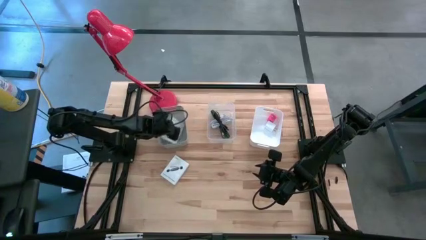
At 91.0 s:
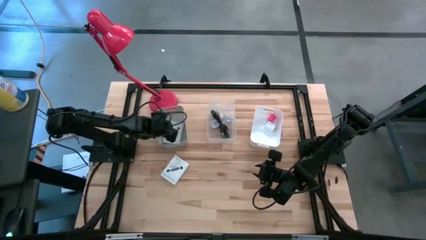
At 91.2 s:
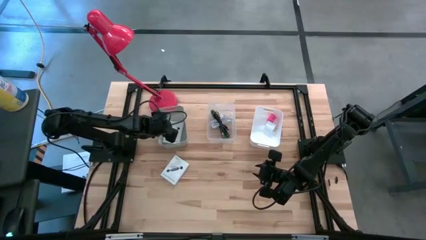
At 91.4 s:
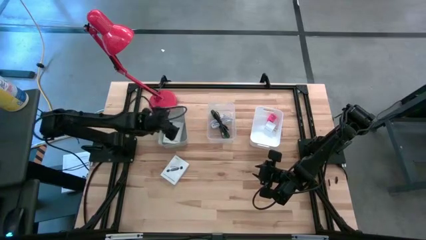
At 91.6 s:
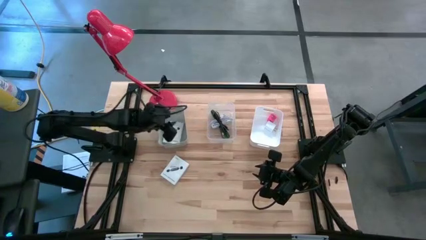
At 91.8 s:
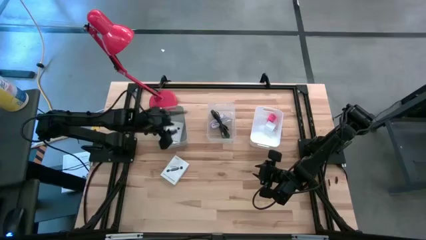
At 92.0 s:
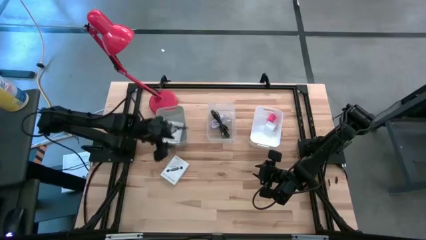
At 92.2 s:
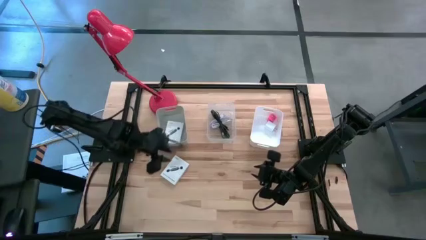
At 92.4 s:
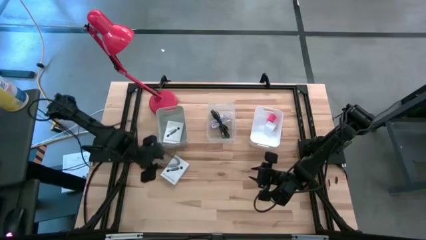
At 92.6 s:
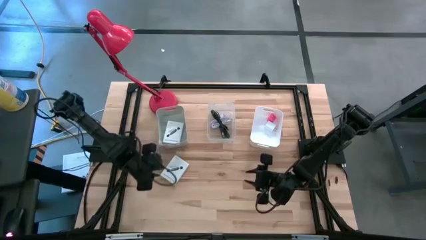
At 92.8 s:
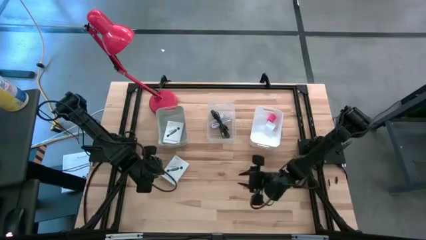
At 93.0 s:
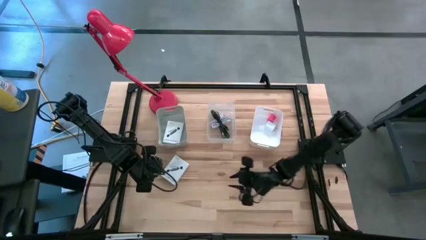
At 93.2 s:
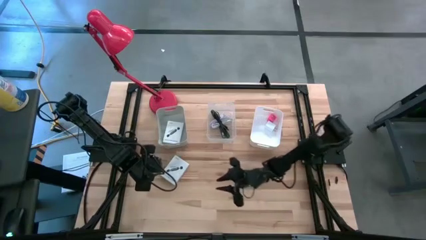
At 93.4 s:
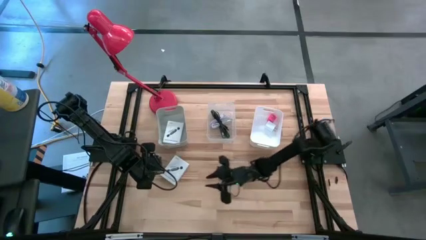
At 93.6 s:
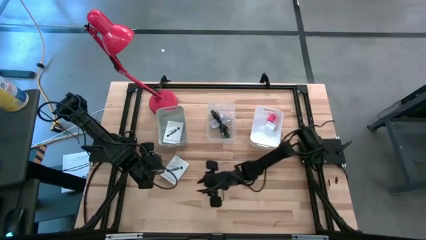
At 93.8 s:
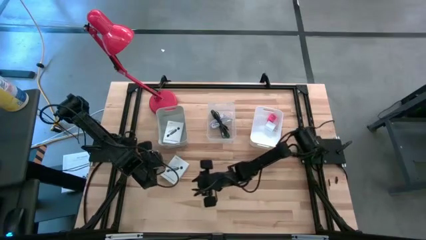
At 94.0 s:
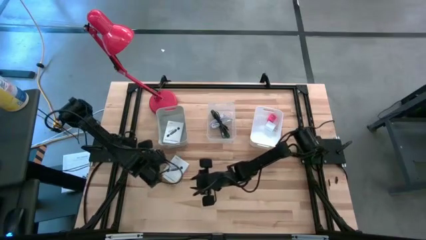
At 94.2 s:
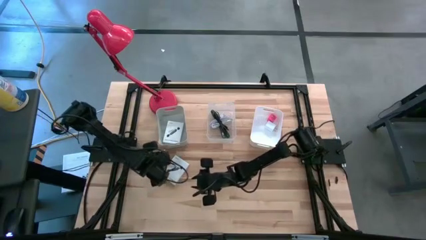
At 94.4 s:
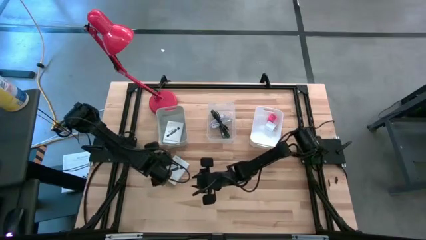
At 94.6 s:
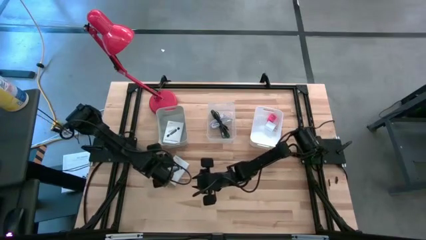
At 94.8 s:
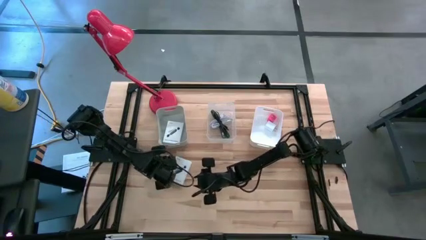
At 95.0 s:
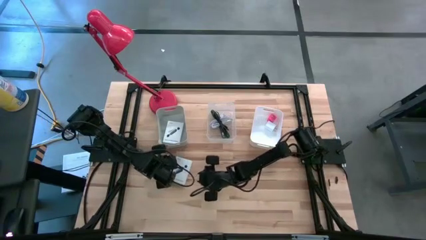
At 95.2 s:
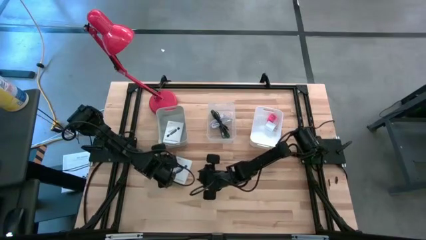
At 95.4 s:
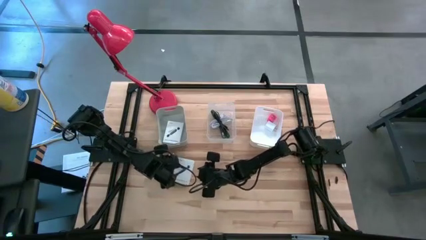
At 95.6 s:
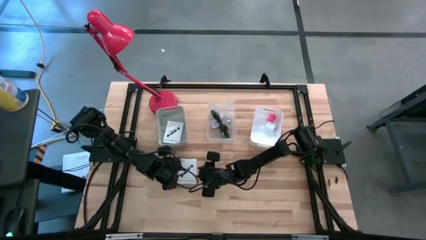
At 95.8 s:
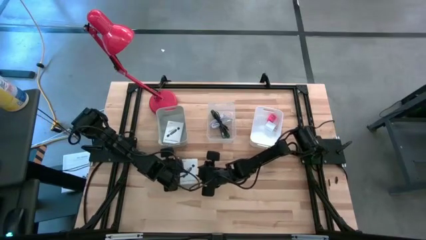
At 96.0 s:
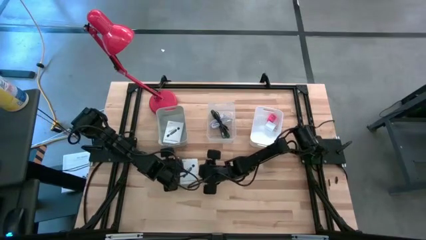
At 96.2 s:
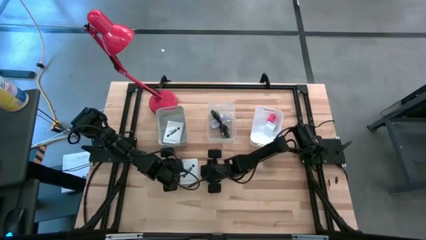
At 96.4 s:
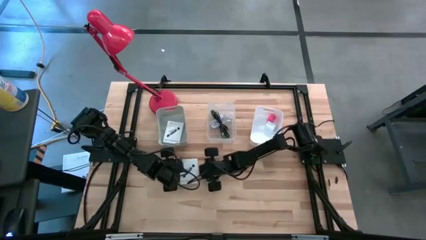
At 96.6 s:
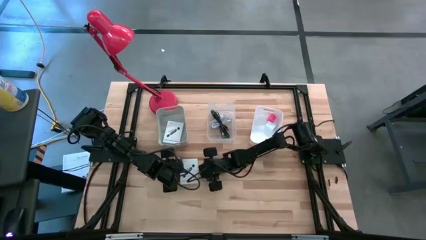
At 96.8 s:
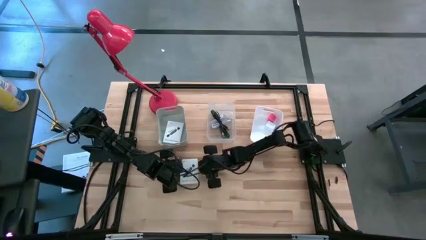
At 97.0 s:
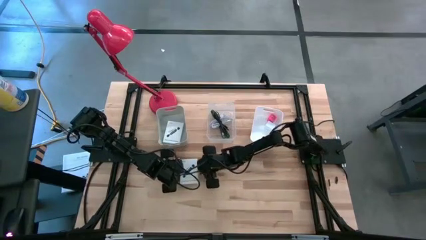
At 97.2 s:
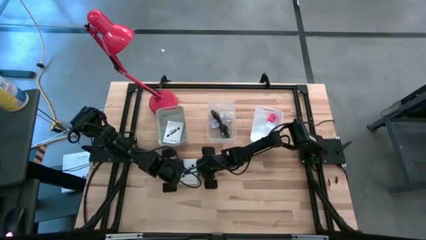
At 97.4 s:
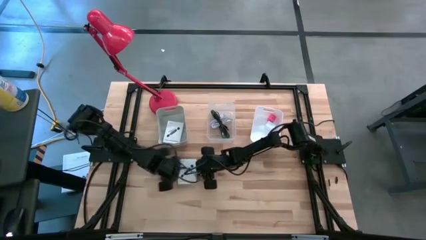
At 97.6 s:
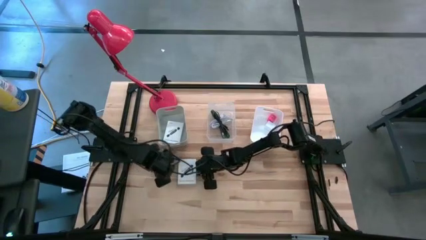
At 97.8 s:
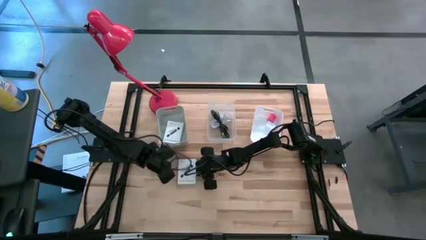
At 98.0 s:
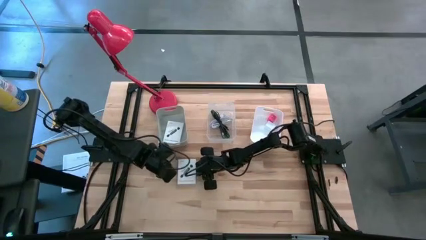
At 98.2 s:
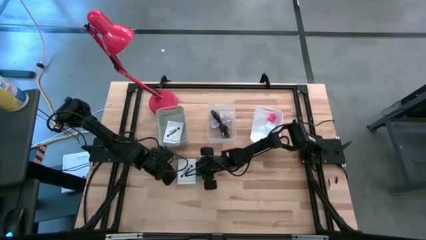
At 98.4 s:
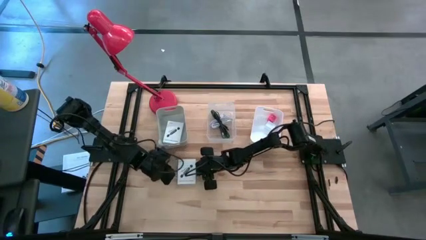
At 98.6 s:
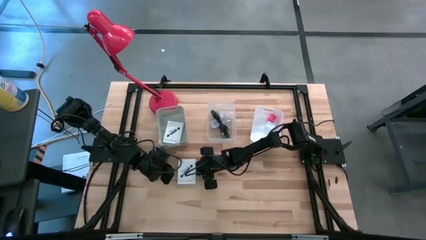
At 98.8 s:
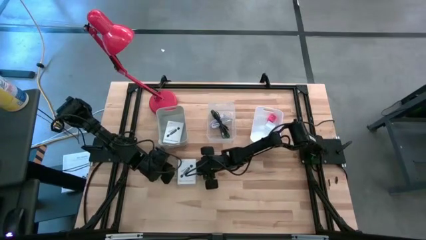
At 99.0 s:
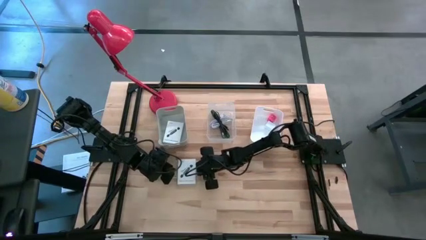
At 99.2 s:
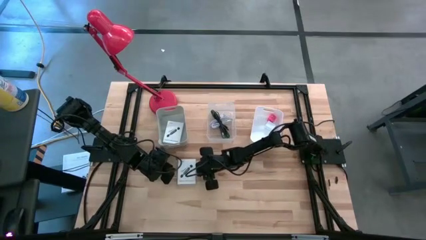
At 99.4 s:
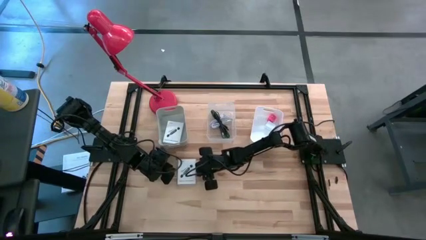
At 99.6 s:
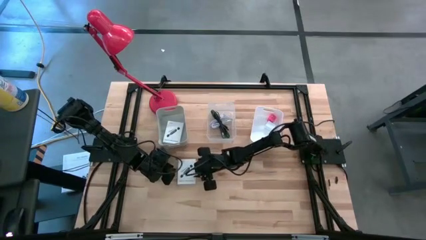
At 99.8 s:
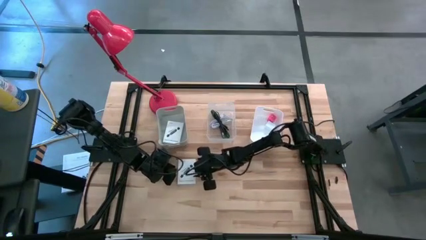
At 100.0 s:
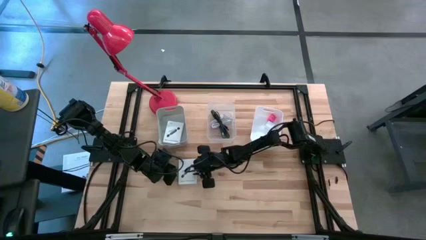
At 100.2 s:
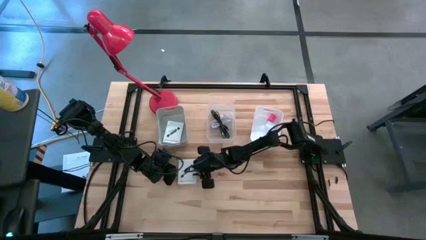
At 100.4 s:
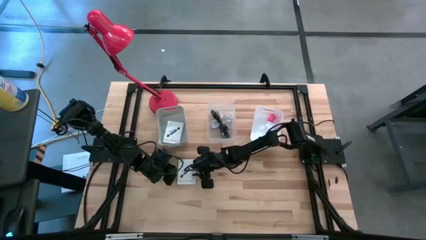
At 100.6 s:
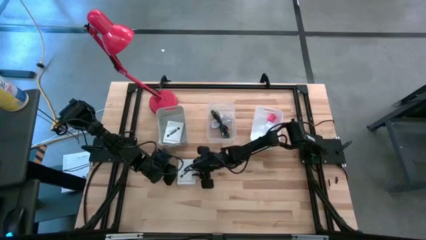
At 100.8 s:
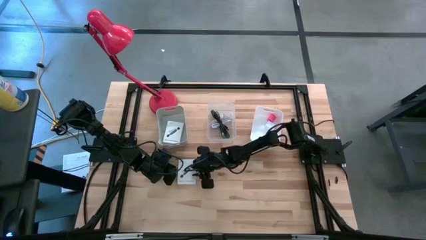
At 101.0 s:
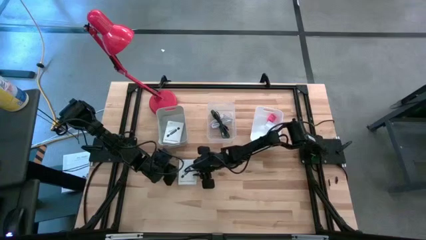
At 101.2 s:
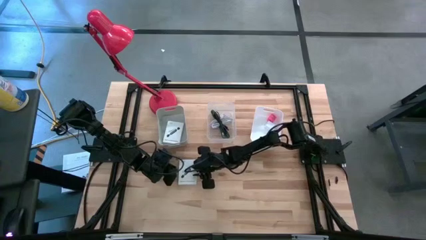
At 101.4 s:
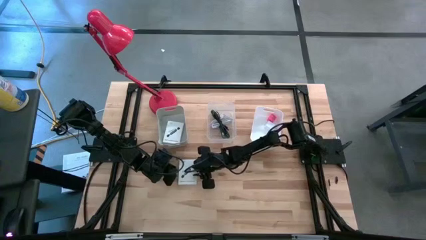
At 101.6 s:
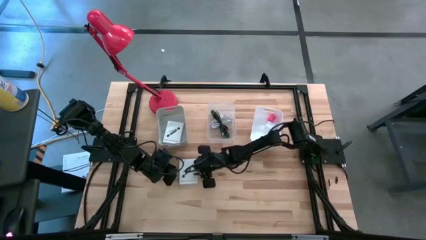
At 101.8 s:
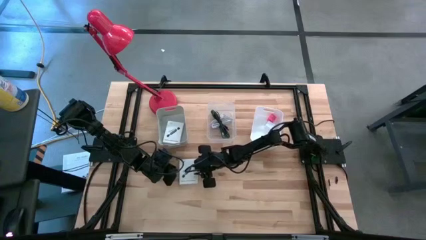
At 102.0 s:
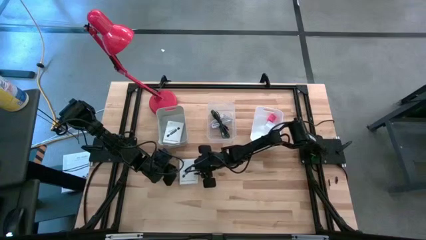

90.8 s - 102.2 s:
Task: Pick and place items into bin
Put the white card reader box into the gray bin

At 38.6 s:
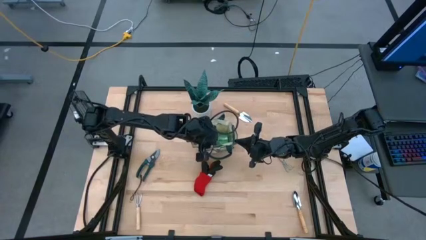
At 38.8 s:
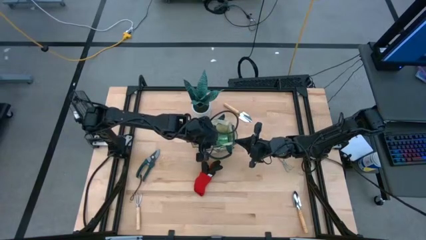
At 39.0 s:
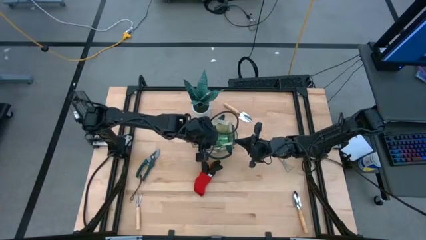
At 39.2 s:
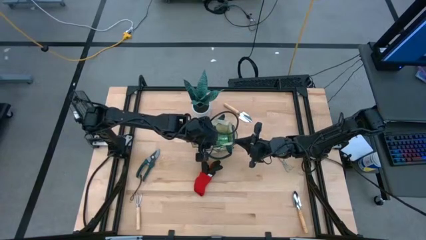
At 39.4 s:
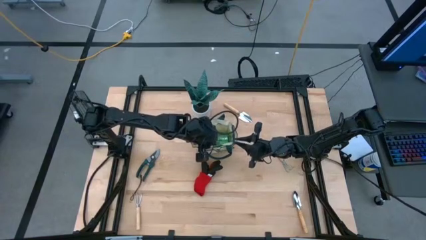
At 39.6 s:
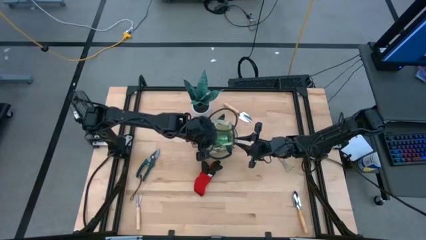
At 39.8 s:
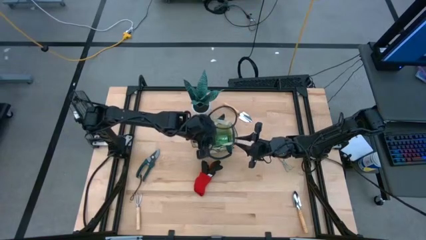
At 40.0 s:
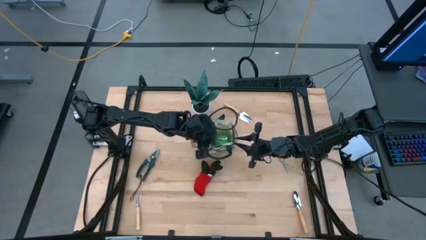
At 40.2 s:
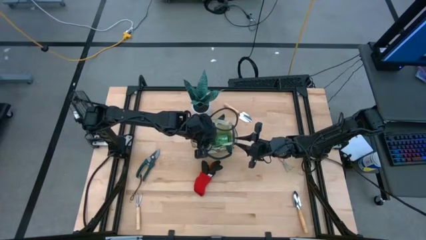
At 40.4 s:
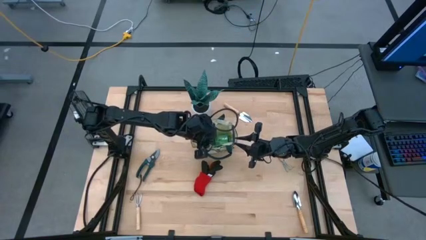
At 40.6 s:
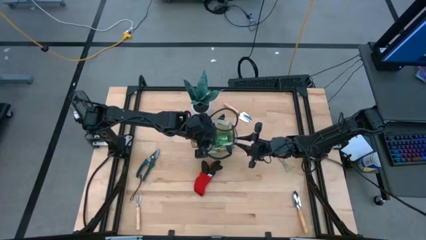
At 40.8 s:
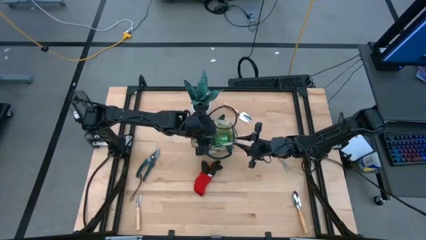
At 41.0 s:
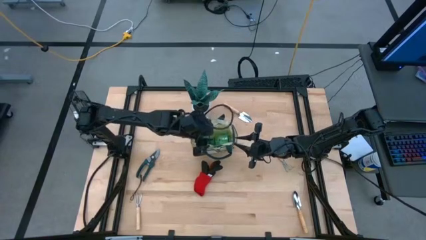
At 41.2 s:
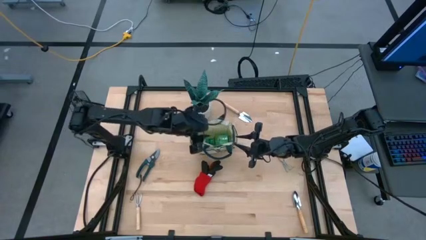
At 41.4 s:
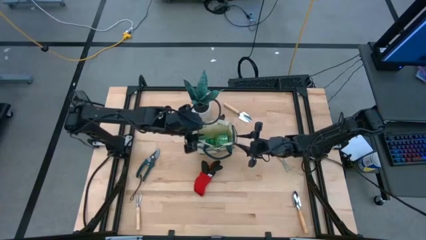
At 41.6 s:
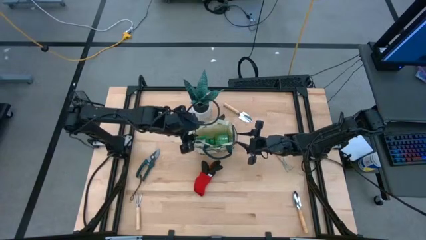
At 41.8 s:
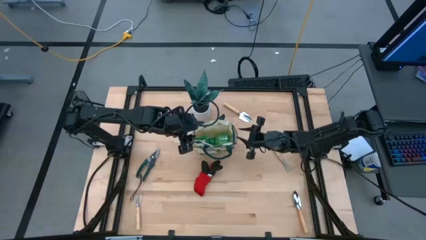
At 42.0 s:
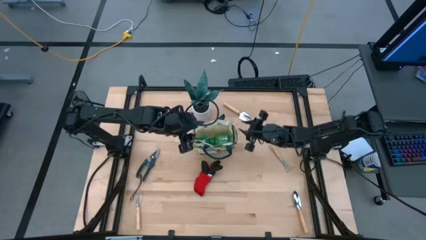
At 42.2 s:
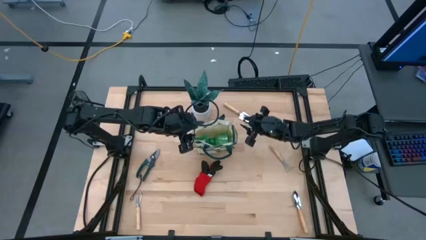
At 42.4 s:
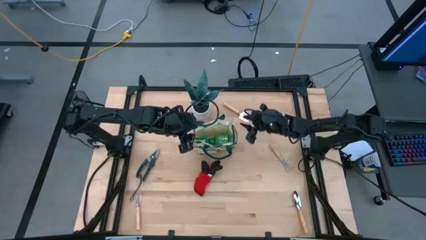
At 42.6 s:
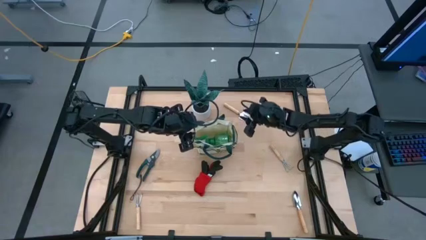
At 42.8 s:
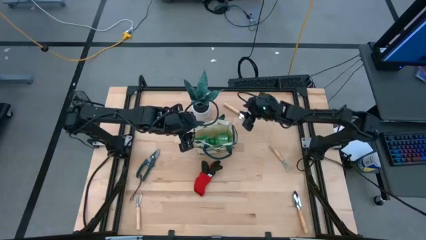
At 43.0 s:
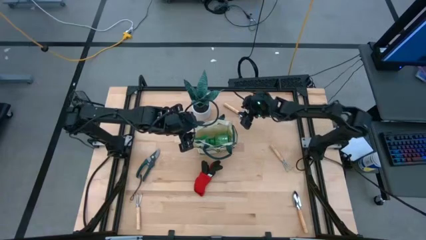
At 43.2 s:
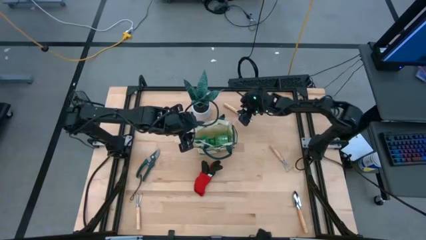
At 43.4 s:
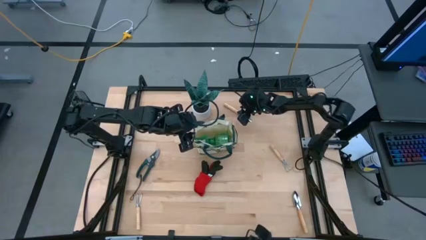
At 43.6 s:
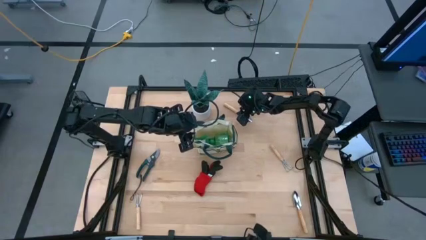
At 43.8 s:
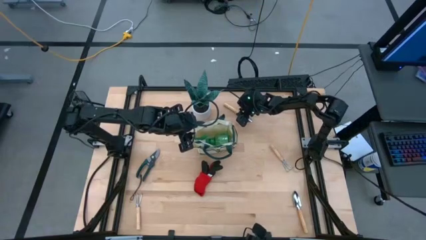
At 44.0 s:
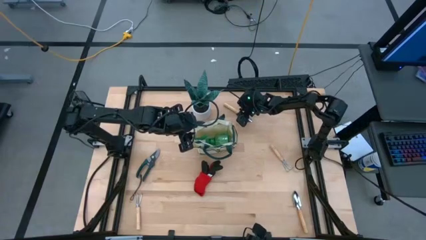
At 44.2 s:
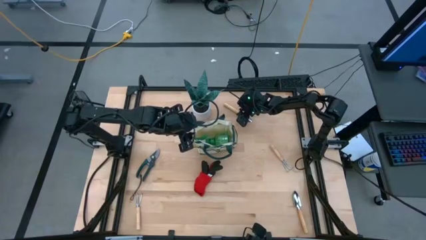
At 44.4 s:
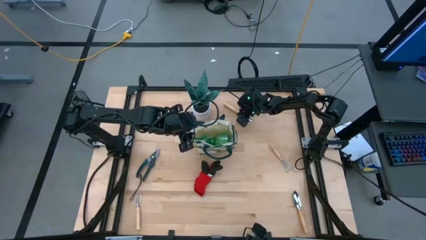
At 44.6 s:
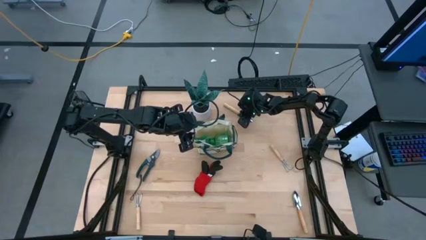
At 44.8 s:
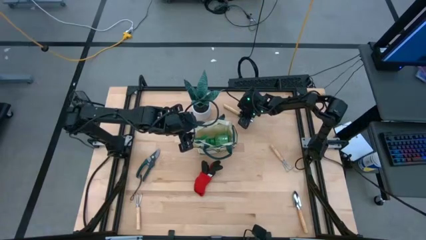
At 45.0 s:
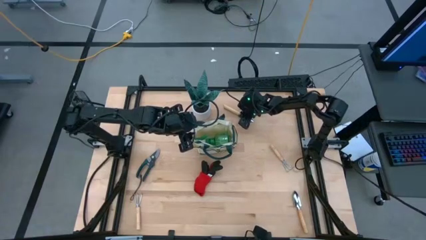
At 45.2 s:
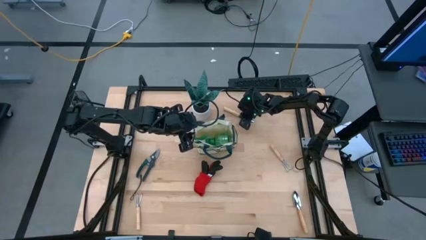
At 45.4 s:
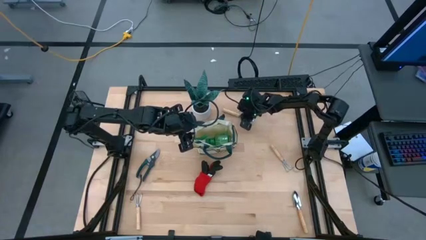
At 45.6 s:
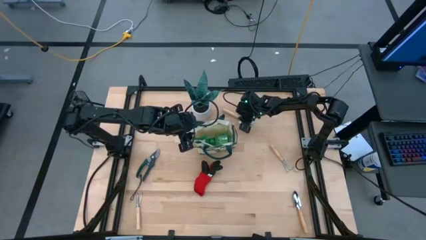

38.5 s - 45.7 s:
Task: Pick & Place Garden tools in Gardening bag
Put the top brown trowel into the gardening bag
